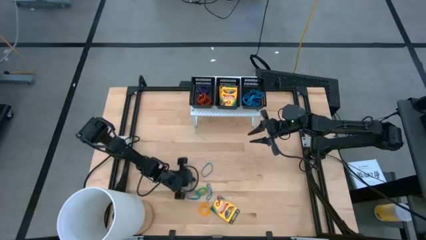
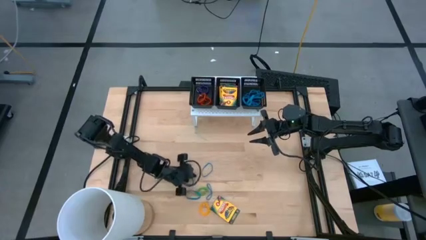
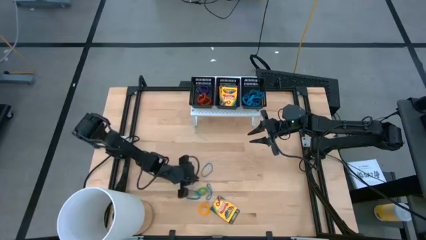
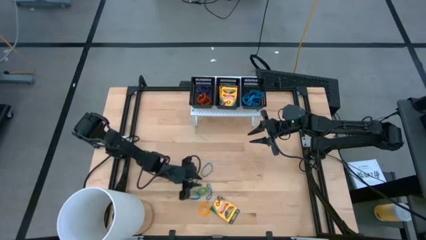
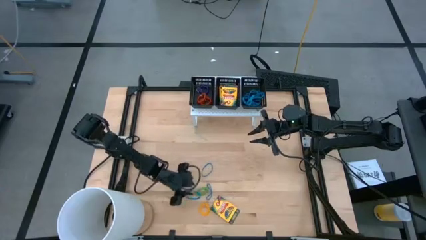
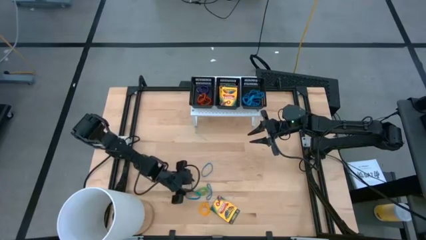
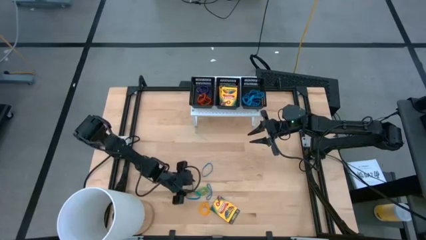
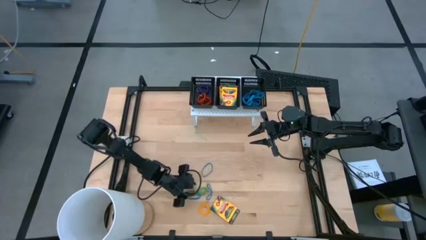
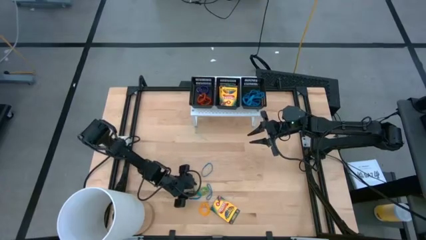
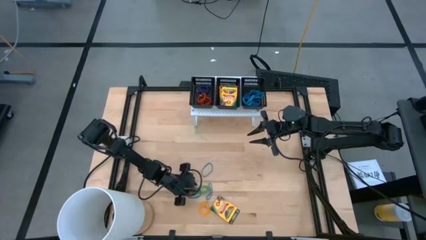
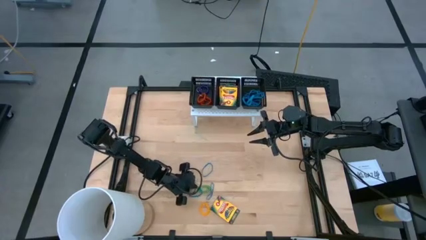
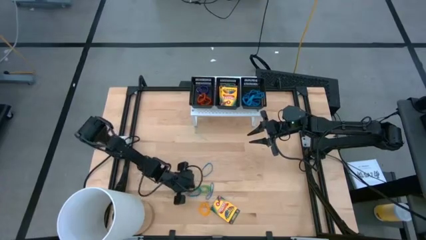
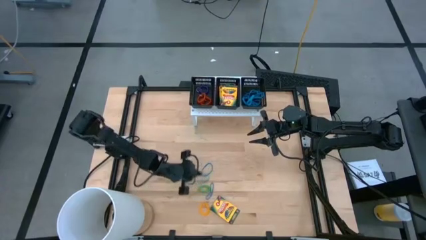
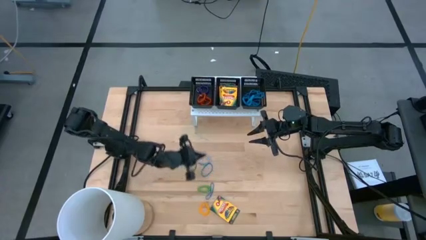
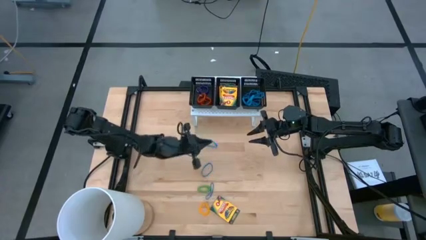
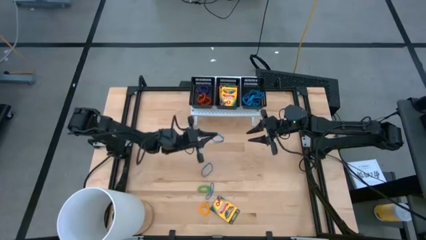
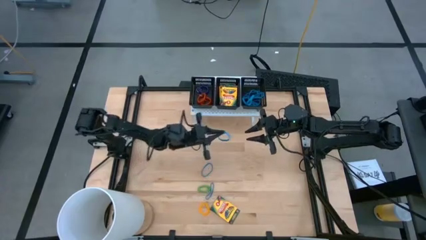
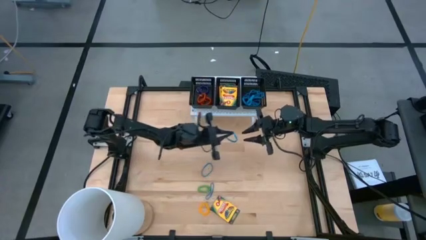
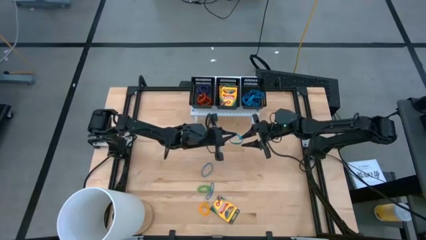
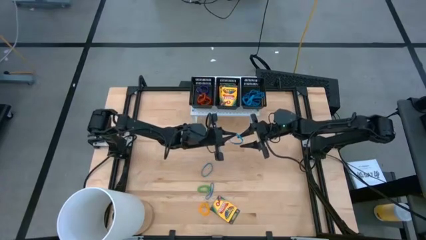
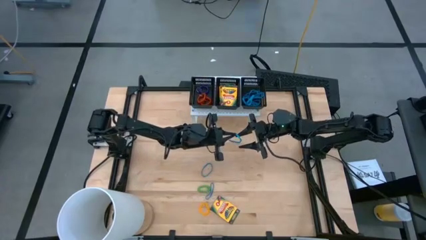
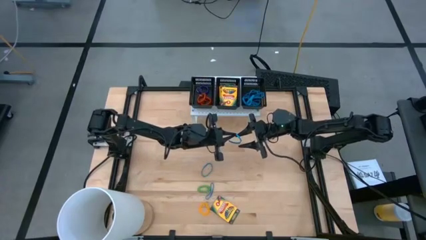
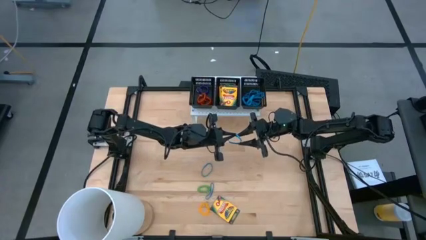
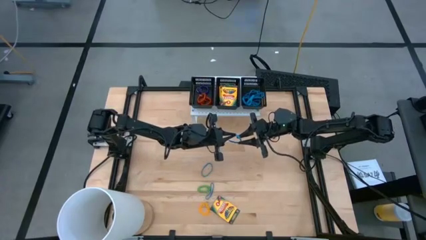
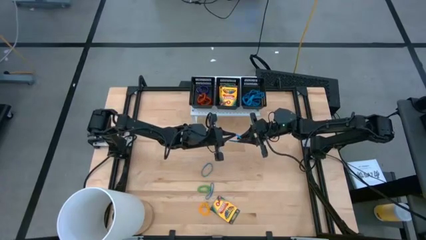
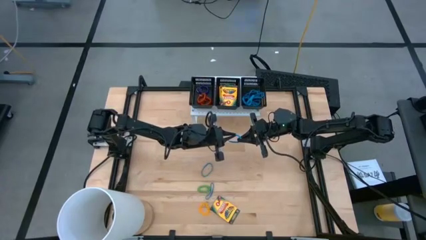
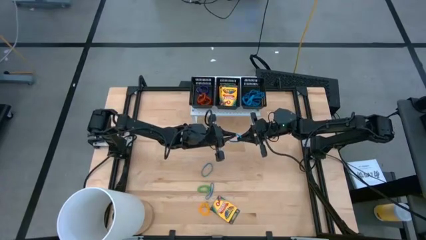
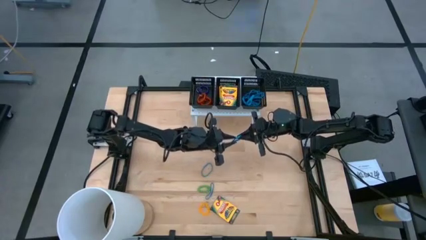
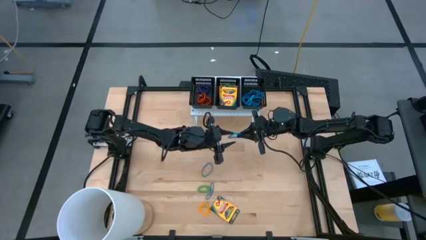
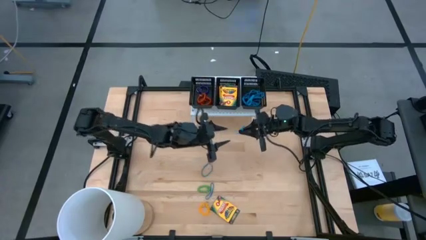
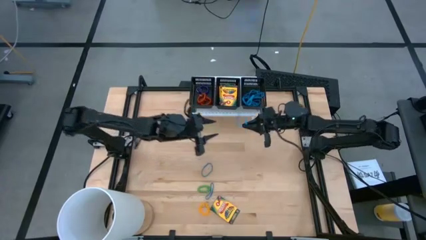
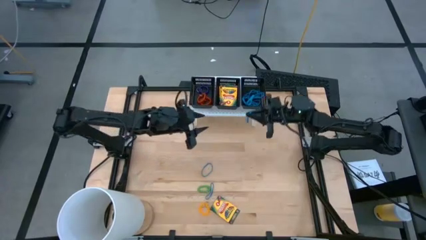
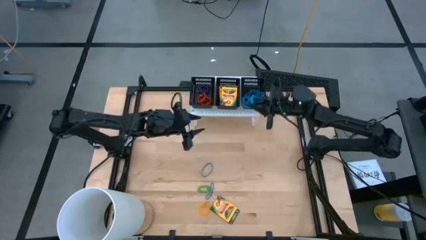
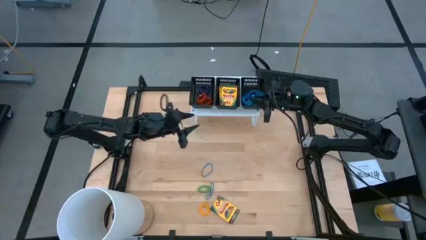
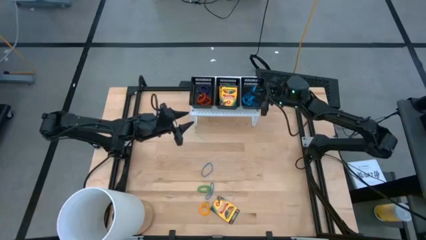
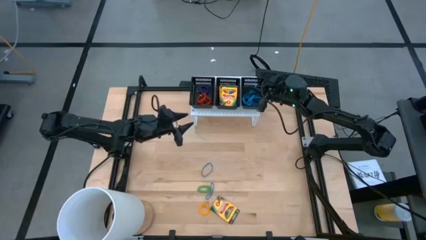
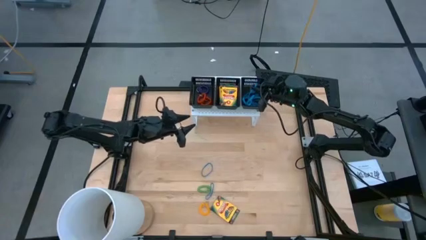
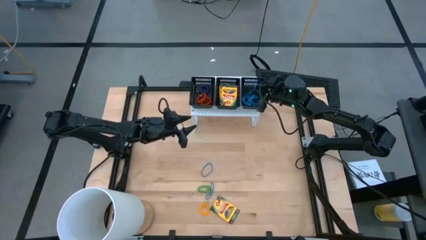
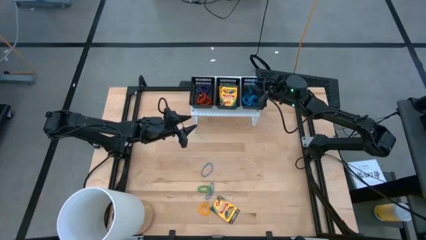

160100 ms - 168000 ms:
Task: Pick & Place Office Desk Supplies
Put the blue rubber band into the right black bin on the shelf

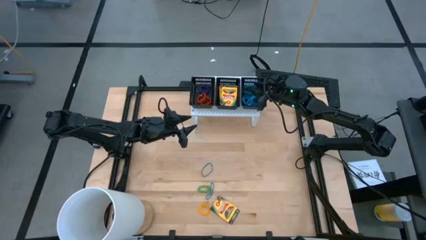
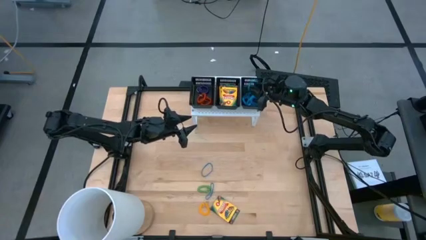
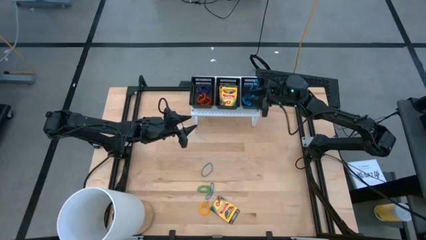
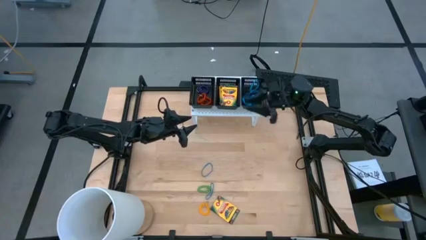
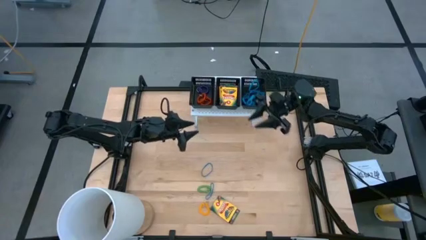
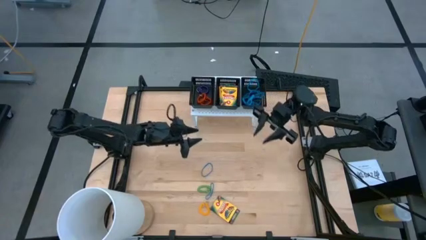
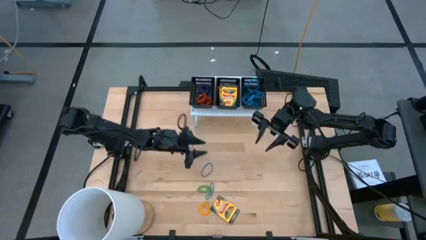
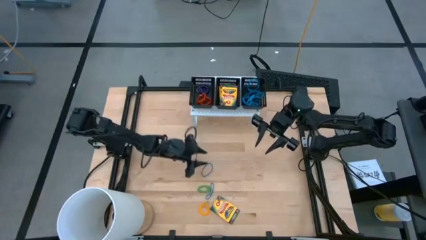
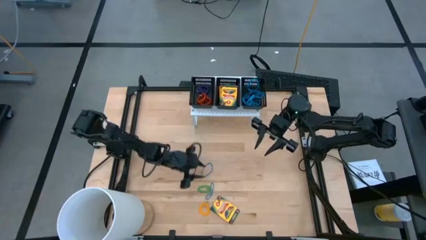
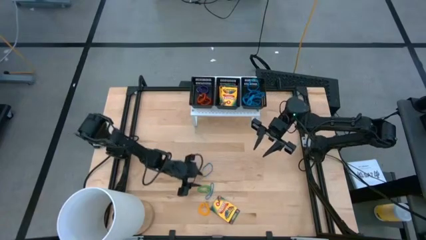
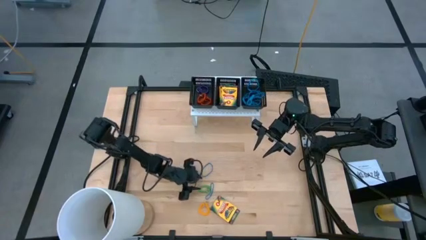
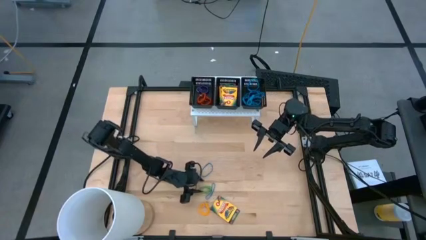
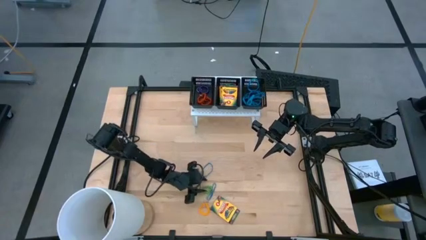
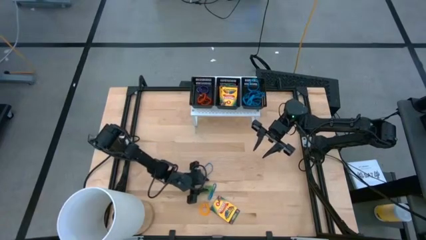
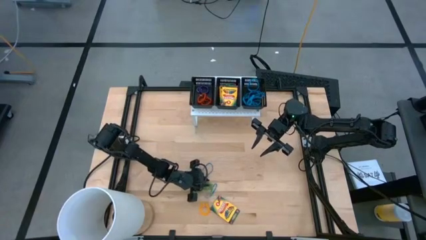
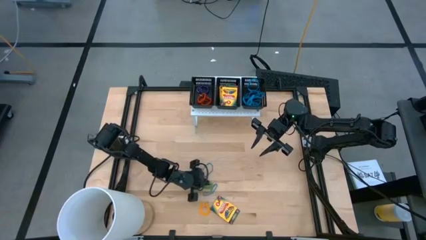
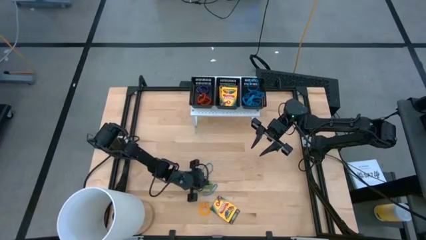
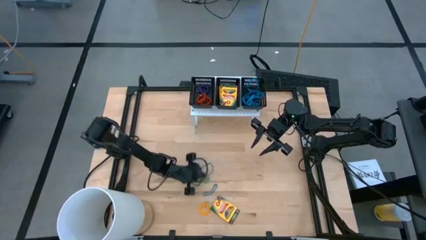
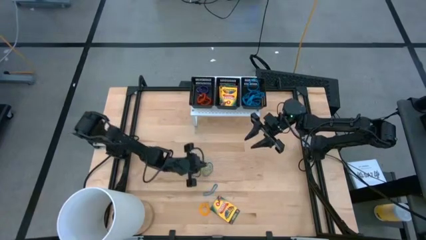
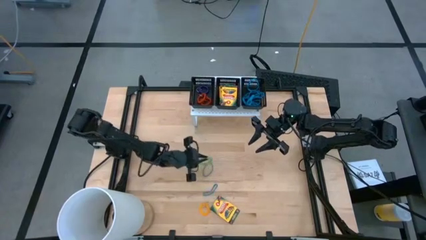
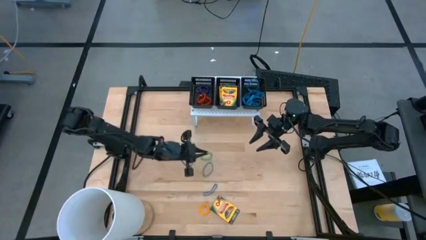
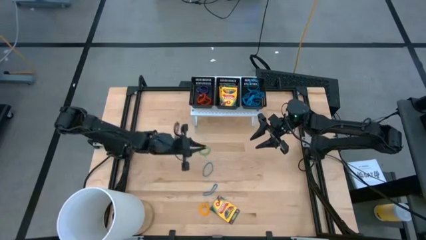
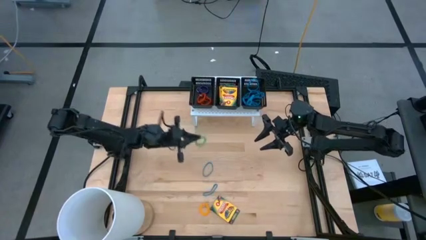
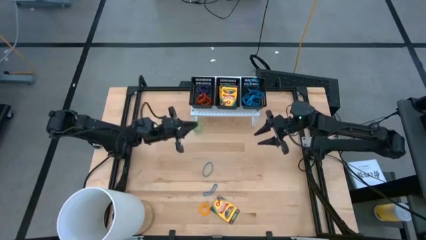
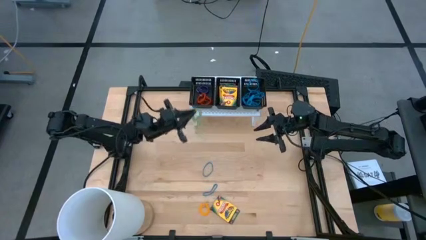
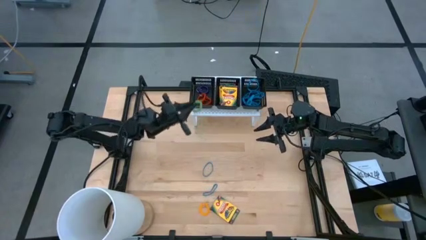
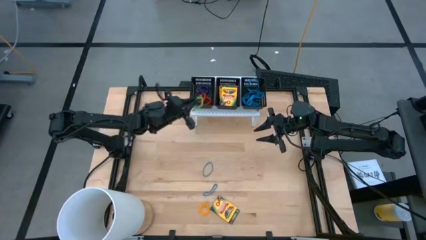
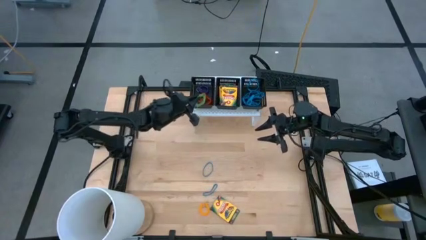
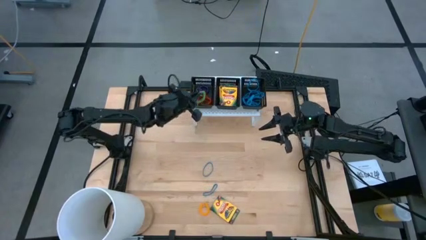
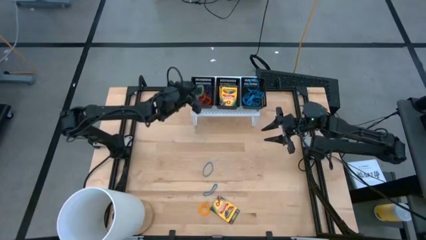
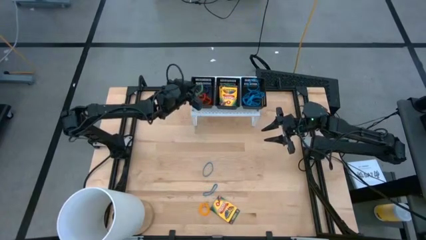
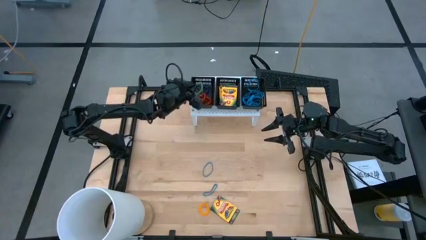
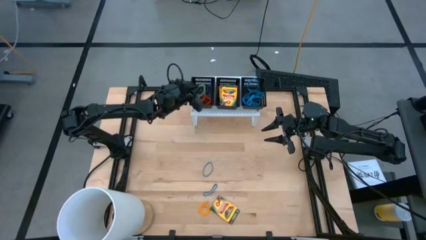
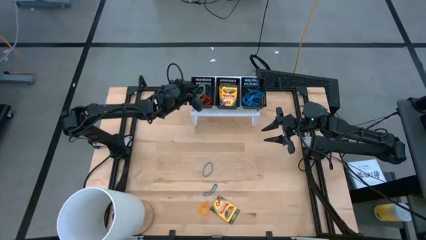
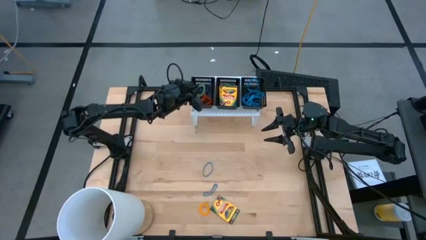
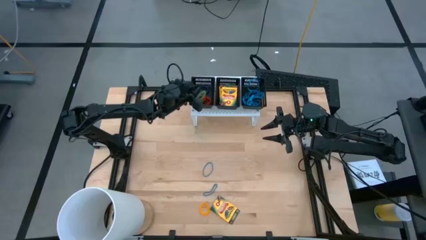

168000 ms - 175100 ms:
Put the green spring keychain into the right black bin on the shelf

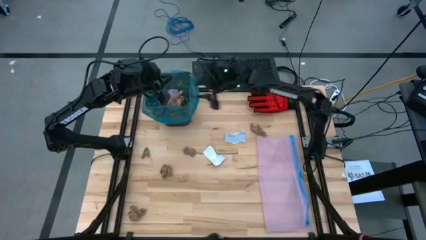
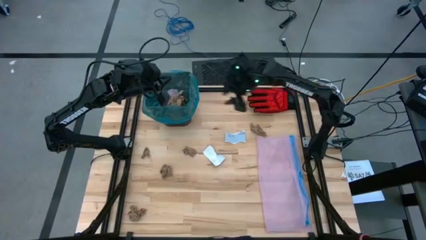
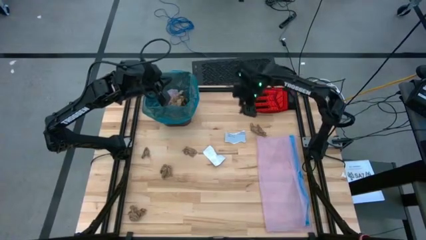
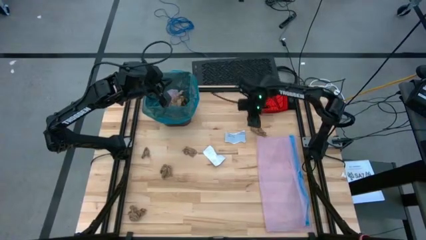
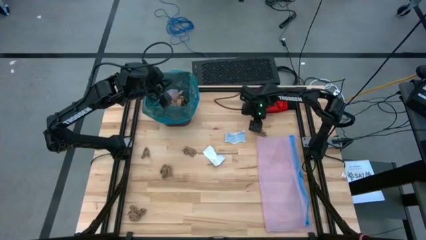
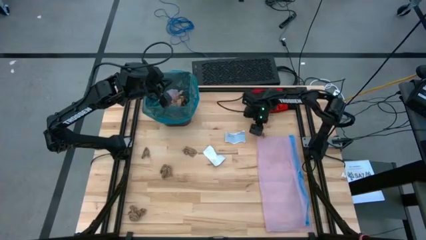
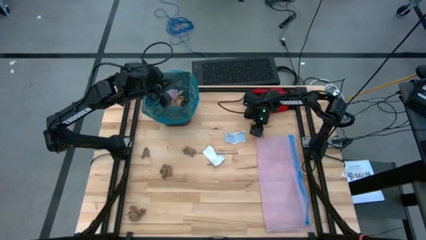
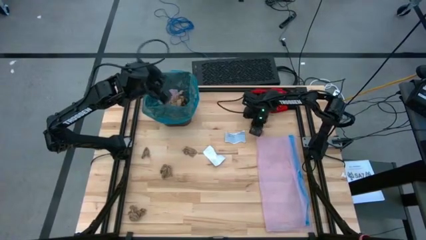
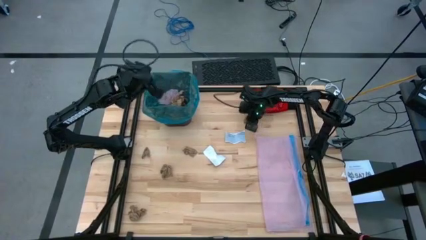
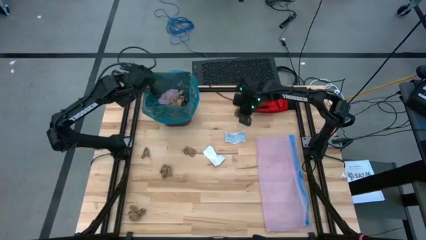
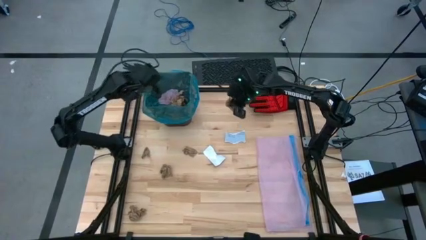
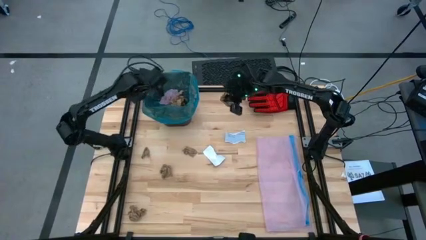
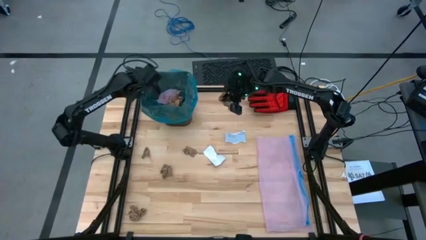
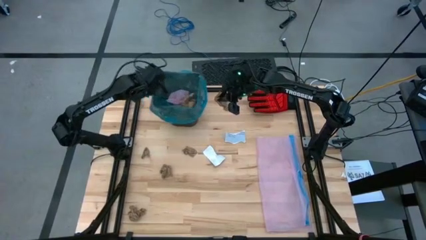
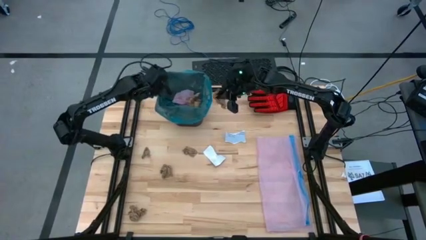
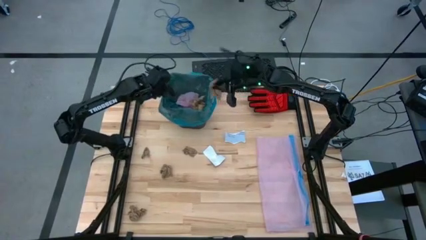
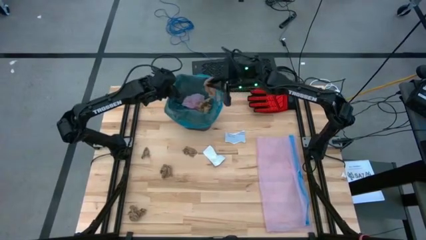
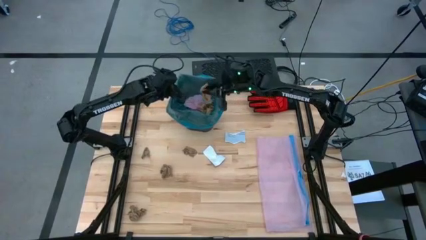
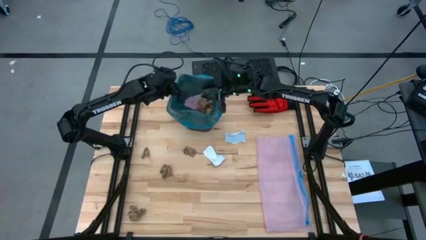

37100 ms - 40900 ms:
Task: place trash/remove bag and relplace
Put the brown napkin into the trash bin
